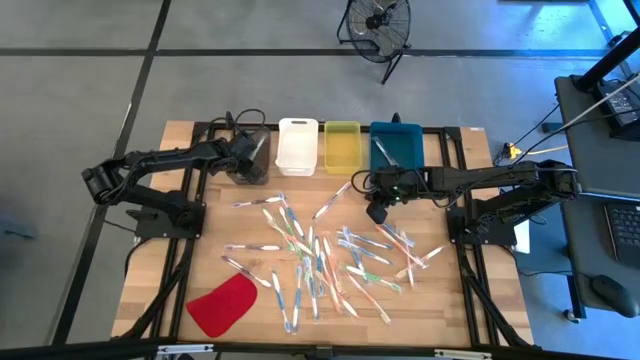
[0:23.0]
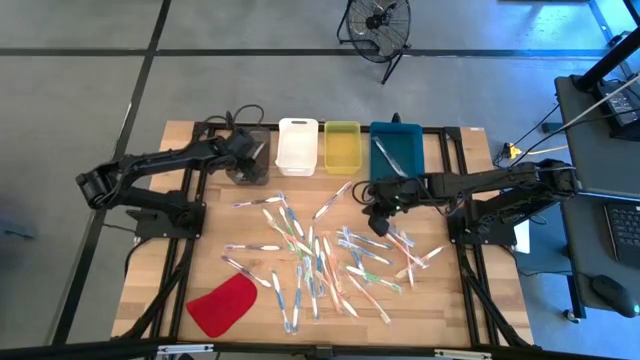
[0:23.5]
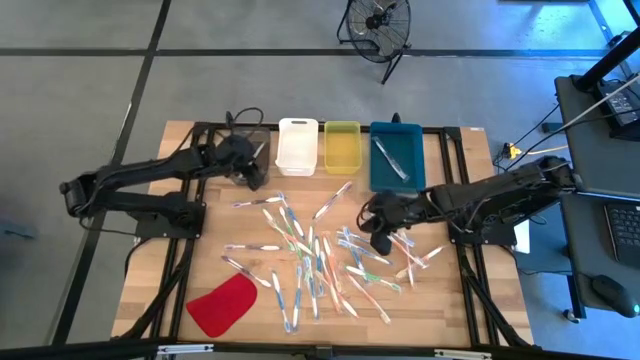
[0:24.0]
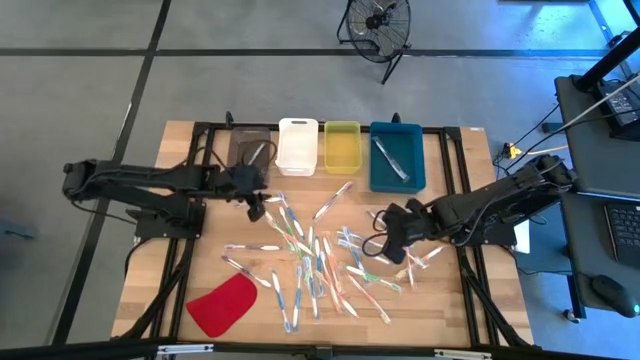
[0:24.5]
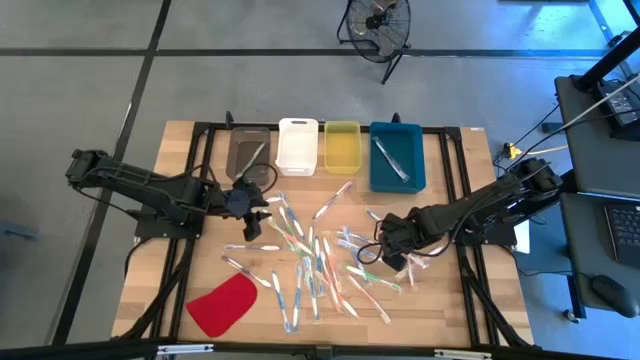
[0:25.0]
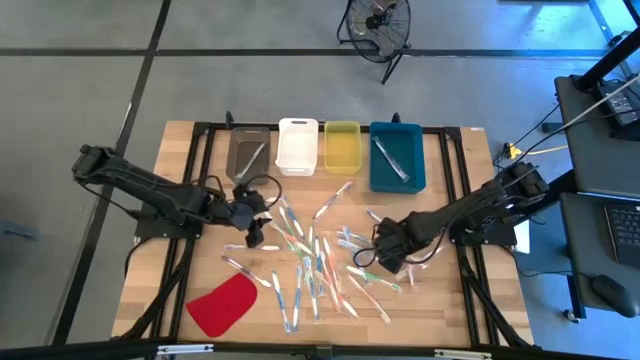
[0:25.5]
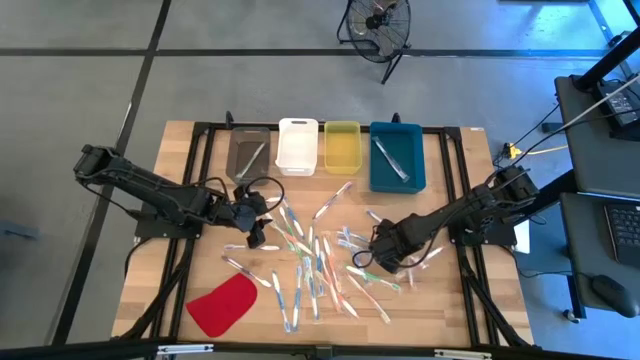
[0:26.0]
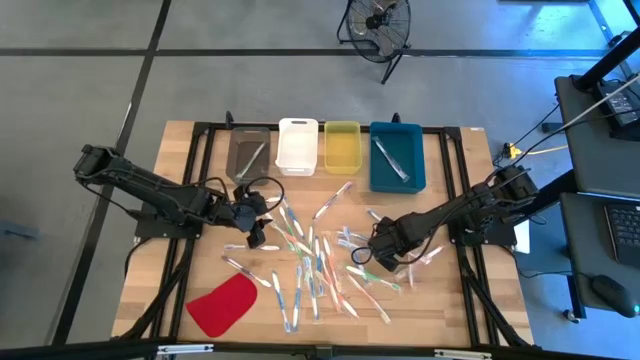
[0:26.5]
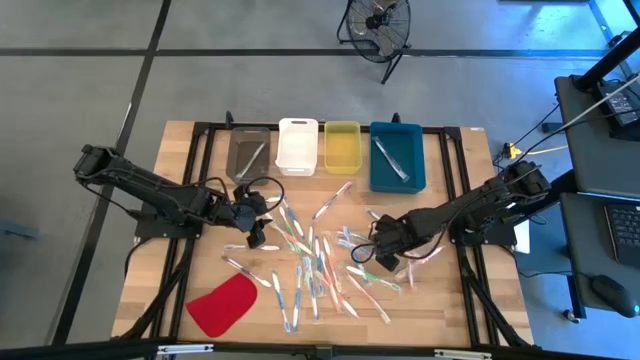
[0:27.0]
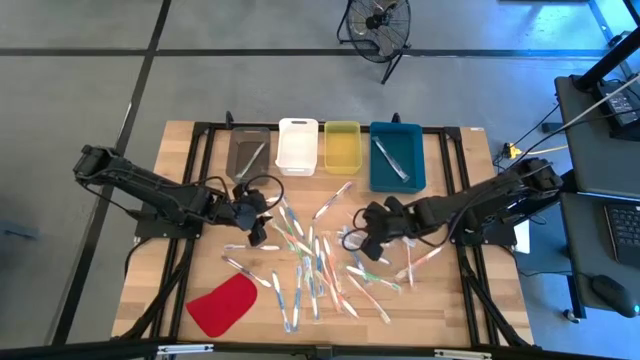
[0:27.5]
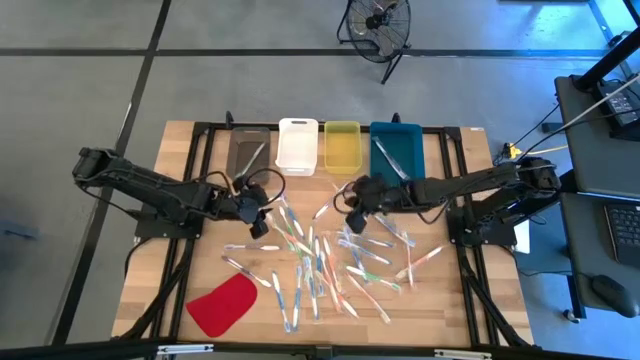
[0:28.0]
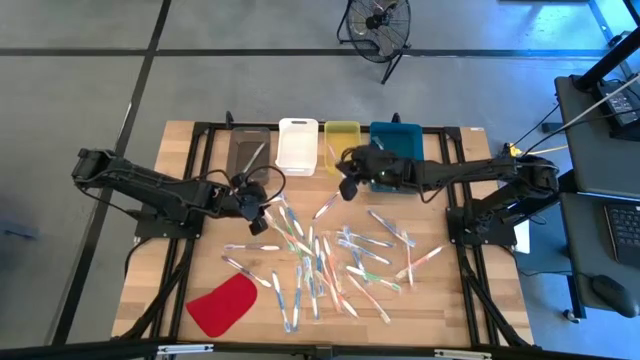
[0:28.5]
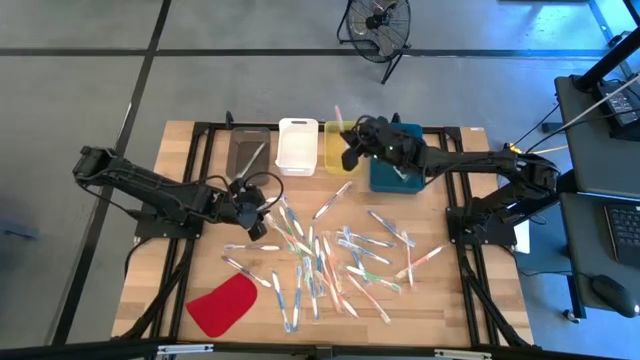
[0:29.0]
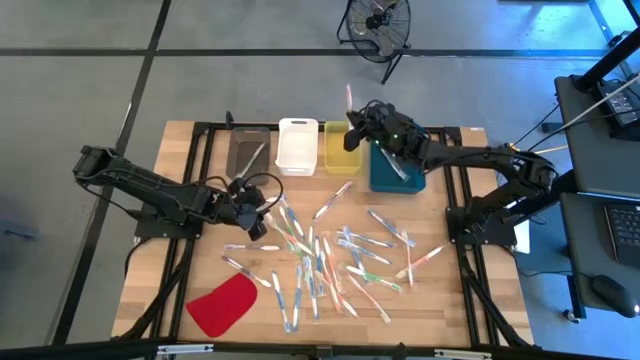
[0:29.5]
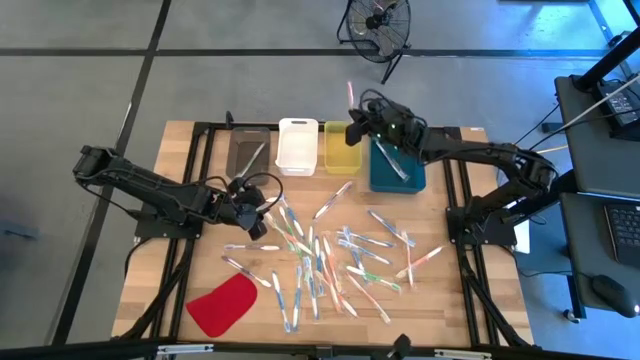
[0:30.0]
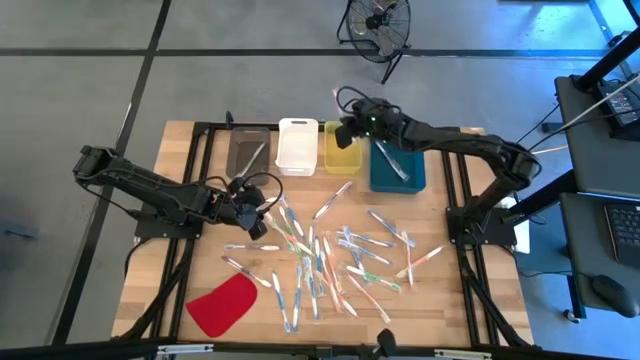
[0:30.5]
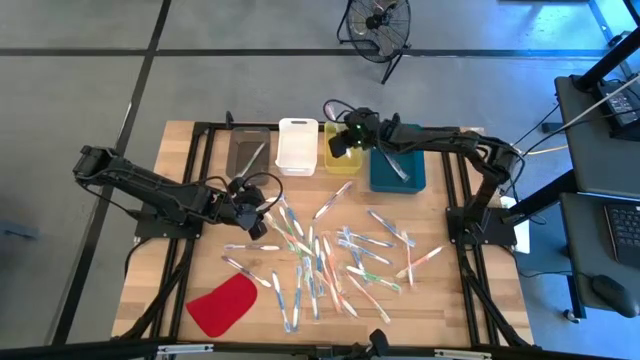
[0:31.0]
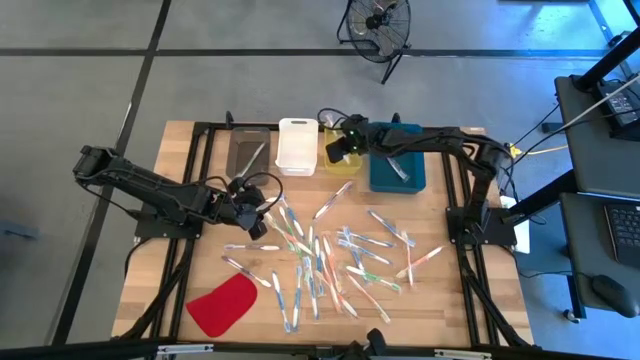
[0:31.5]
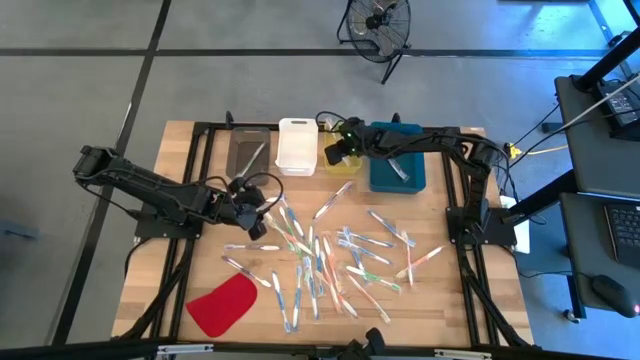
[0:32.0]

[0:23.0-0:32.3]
Task: Pick & Place Toothbrushes
Put the orange toothbrush into the yellow bin

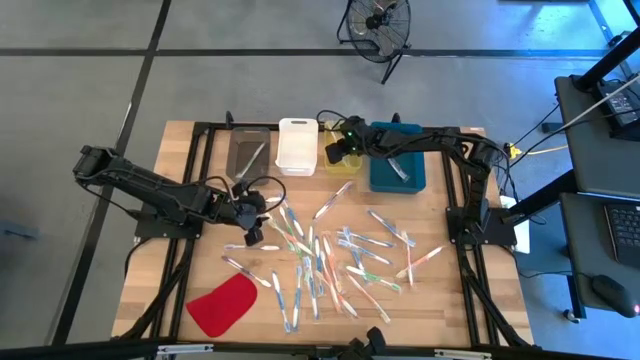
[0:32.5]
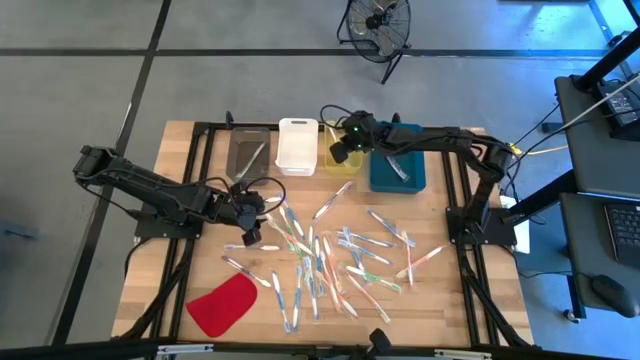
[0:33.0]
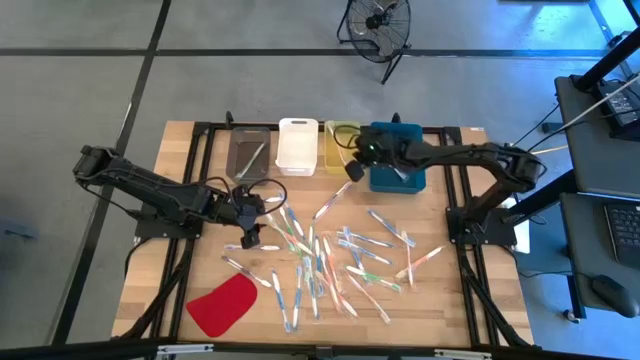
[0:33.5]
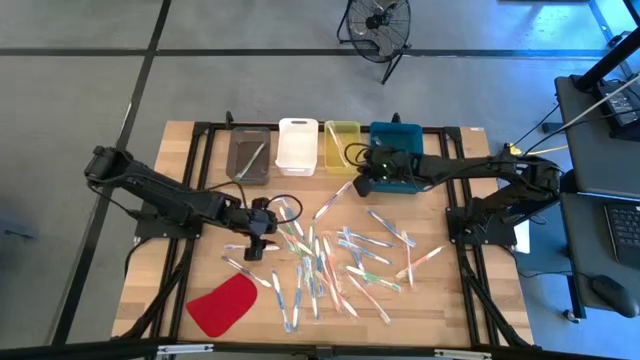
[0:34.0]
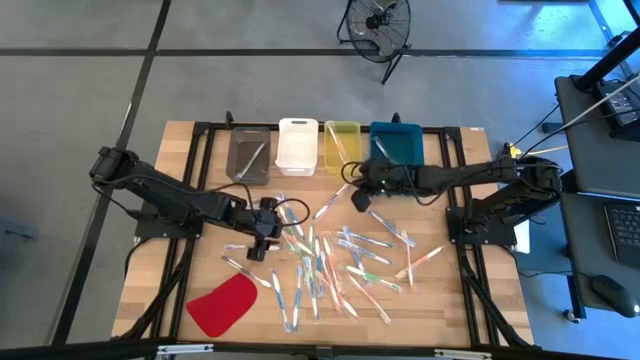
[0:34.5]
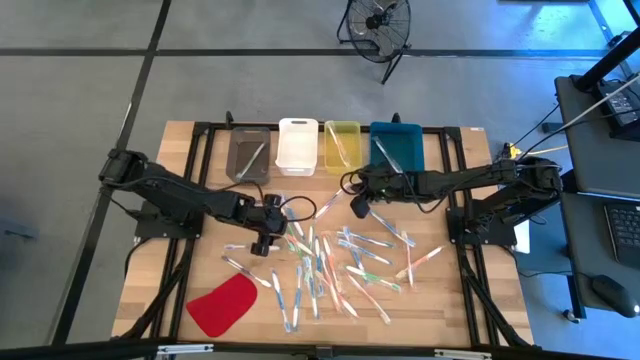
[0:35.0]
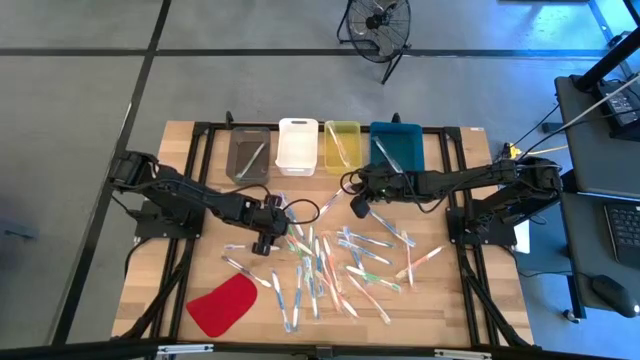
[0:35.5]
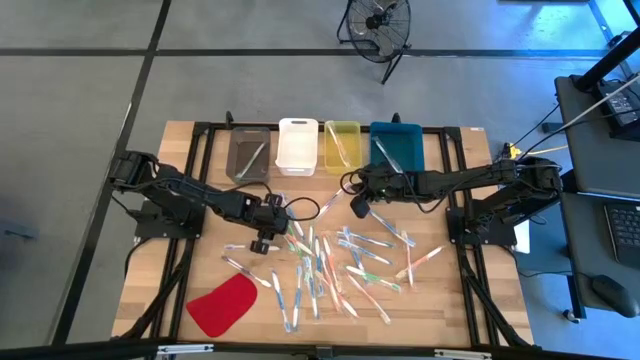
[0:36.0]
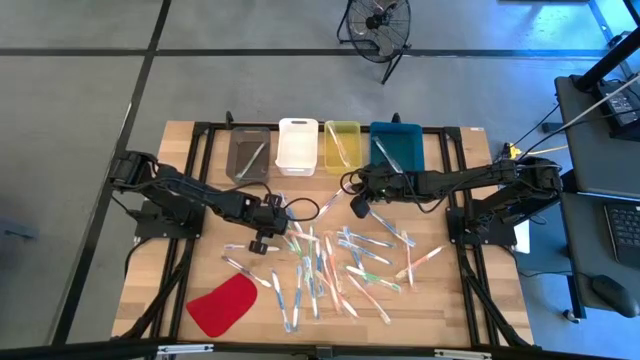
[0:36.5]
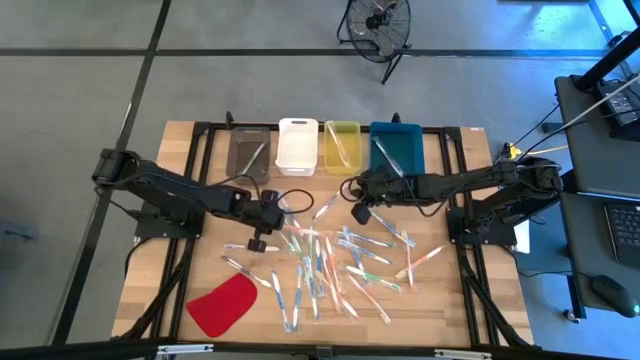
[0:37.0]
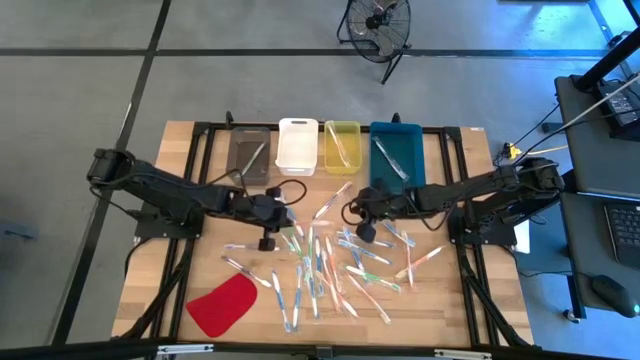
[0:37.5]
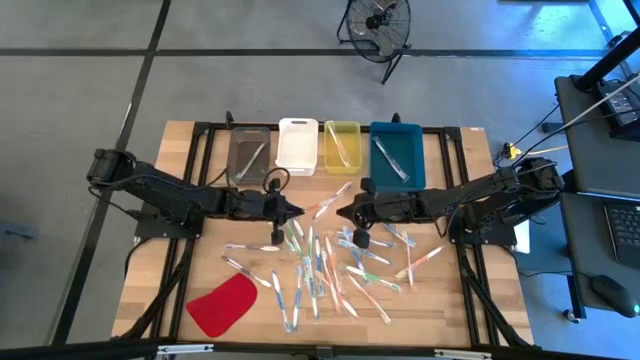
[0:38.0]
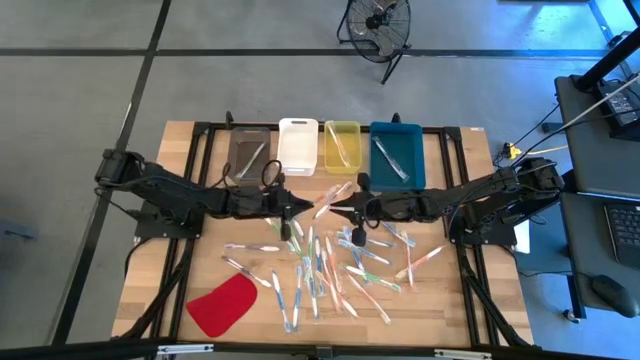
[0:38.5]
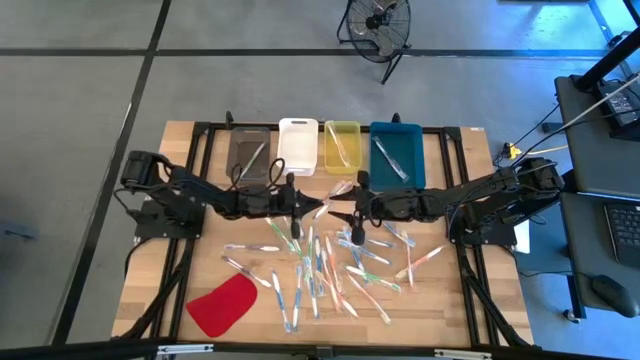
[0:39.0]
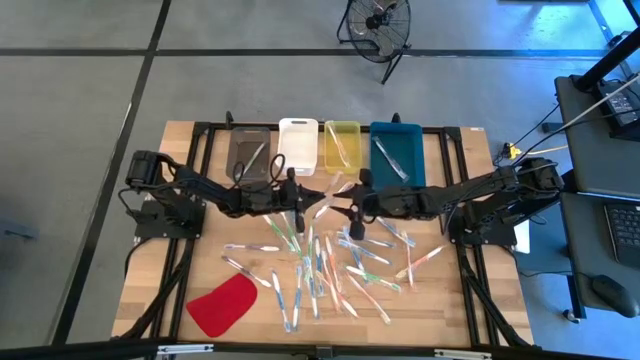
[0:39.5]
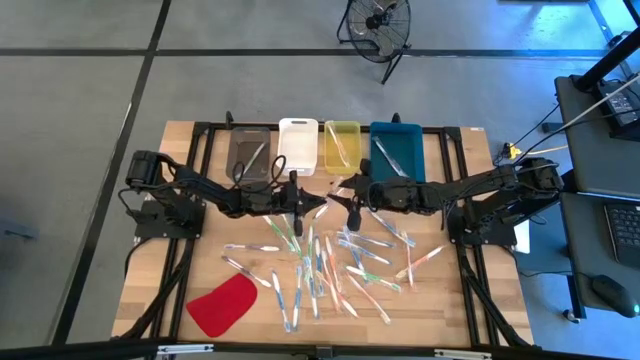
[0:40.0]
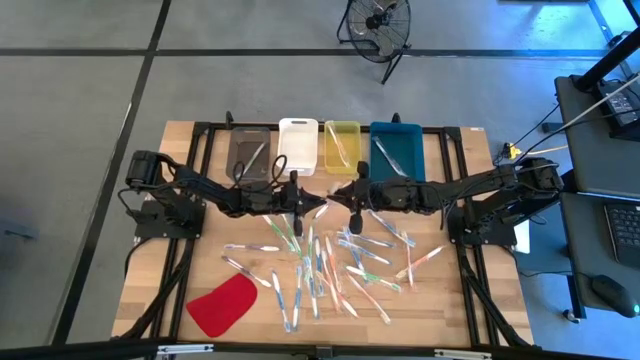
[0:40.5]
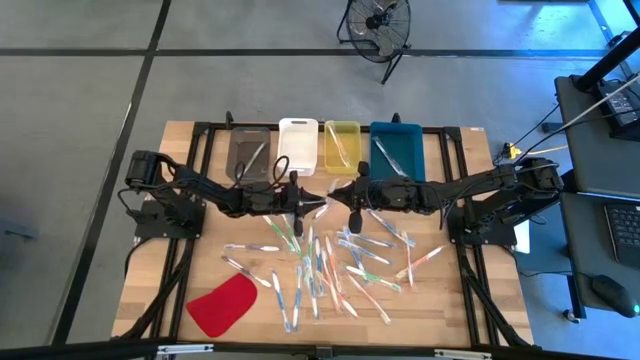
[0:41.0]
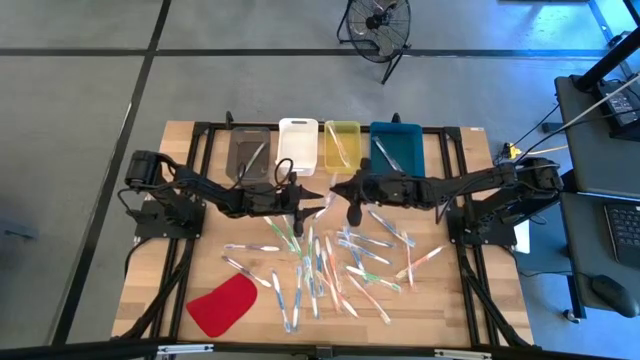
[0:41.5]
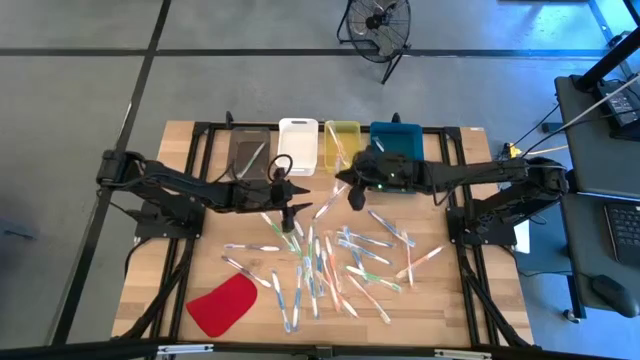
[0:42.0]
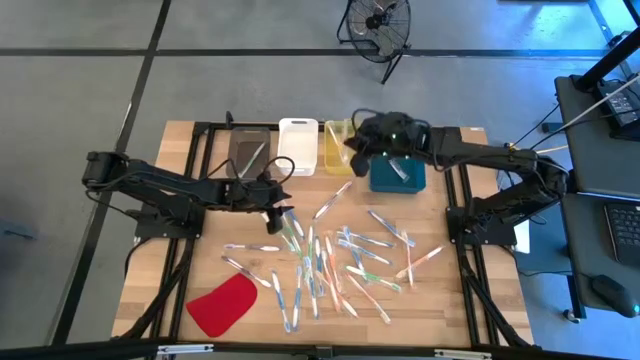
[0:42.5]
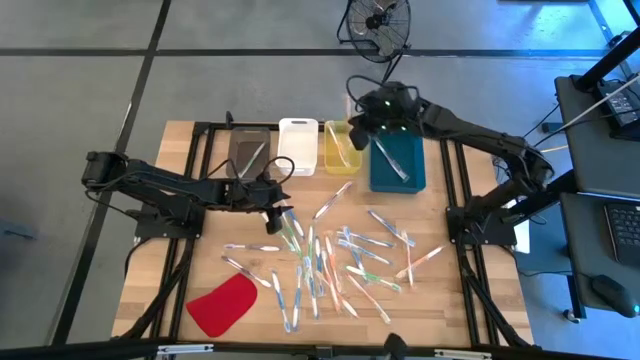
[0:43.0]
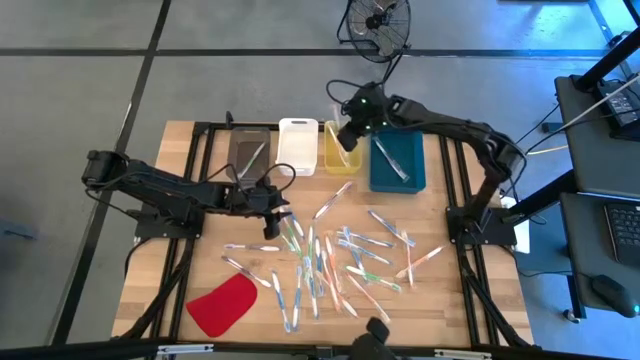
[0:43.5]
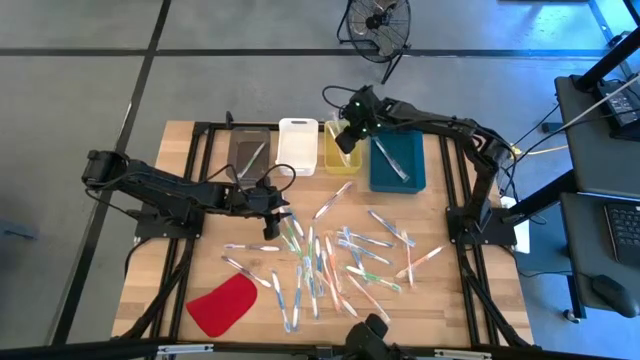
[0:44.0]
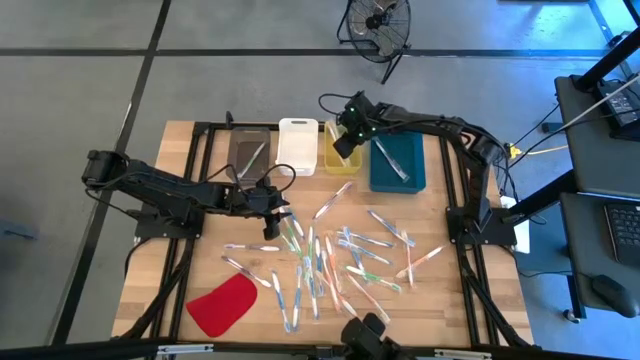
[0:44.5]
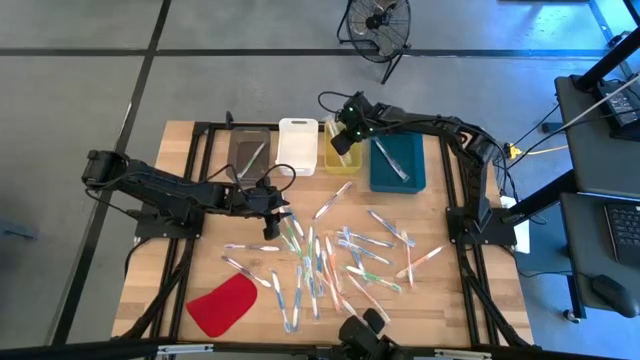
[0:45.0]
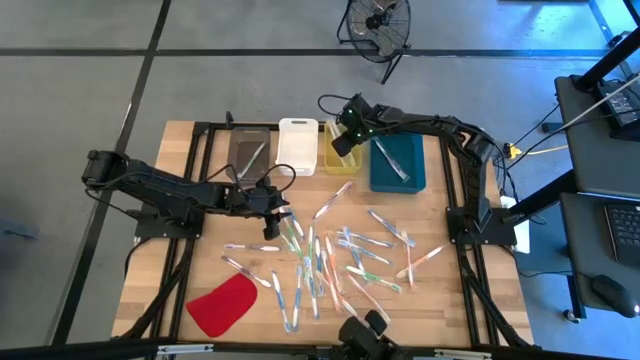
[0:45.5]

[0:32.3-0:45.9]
Put the orange toothbrush into the yellow bin
